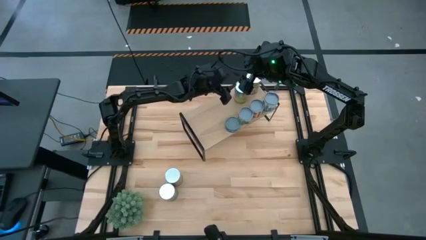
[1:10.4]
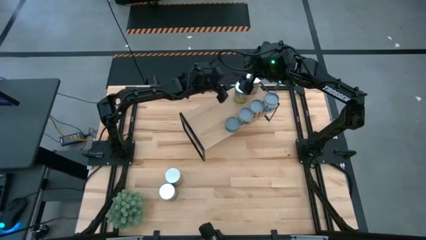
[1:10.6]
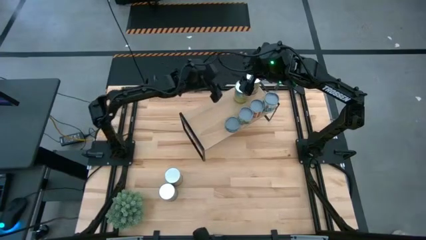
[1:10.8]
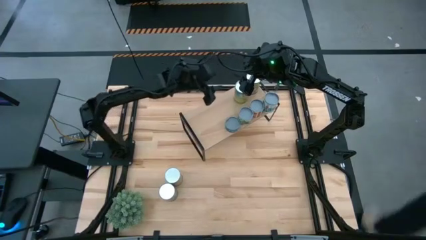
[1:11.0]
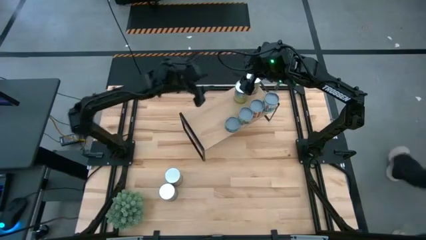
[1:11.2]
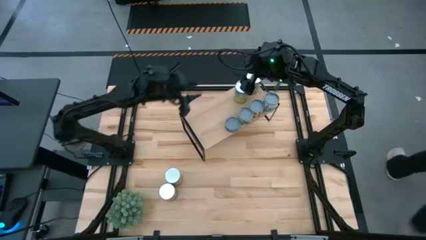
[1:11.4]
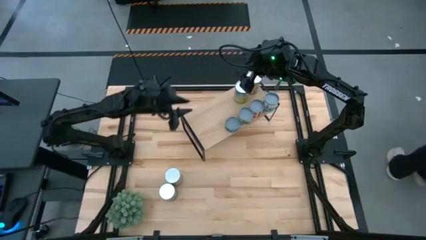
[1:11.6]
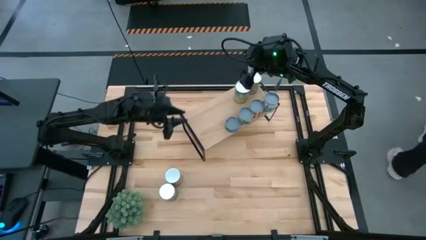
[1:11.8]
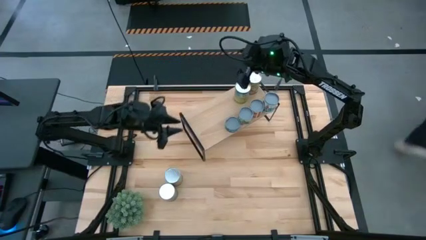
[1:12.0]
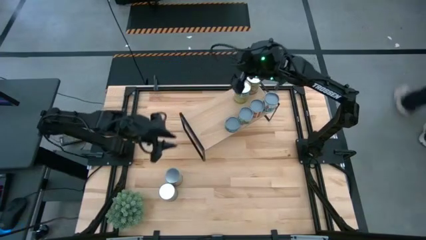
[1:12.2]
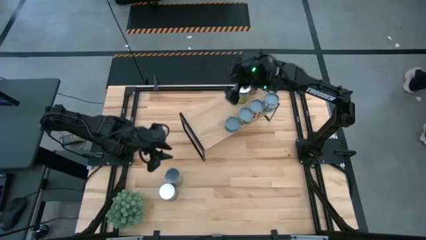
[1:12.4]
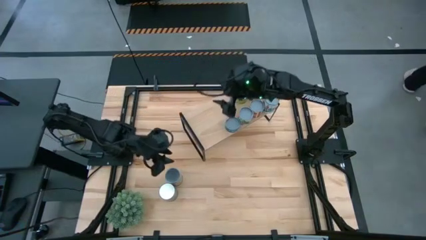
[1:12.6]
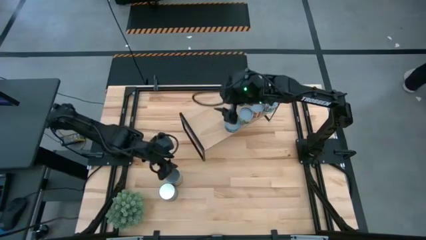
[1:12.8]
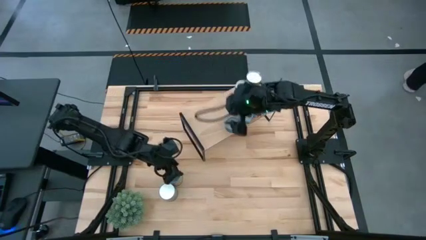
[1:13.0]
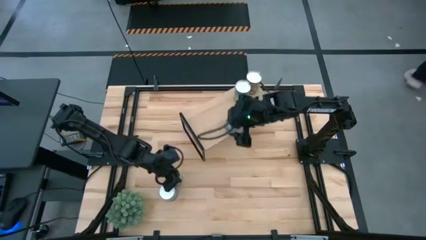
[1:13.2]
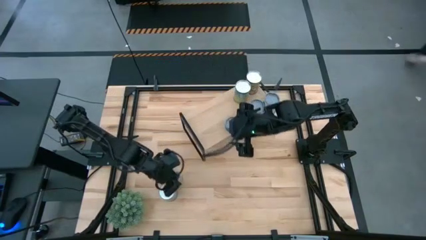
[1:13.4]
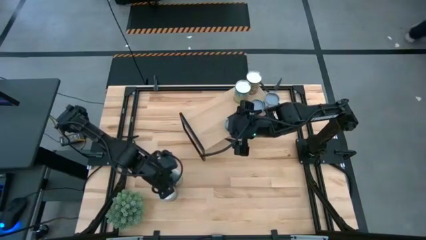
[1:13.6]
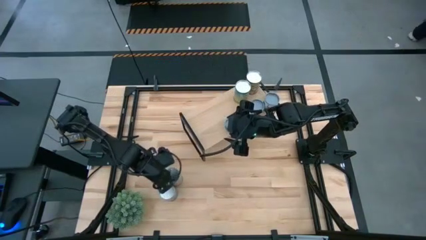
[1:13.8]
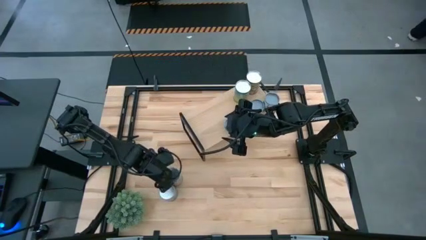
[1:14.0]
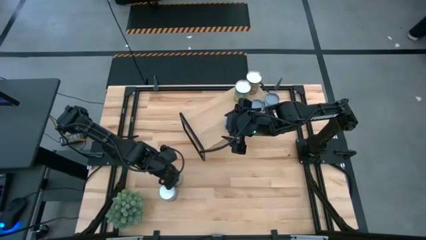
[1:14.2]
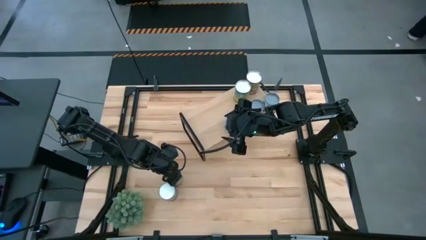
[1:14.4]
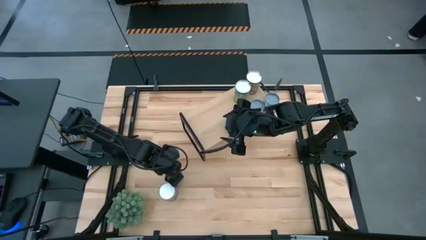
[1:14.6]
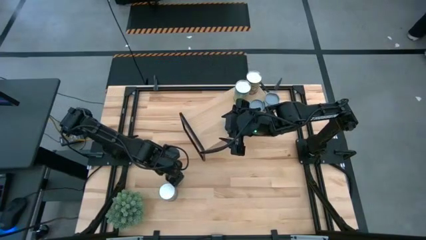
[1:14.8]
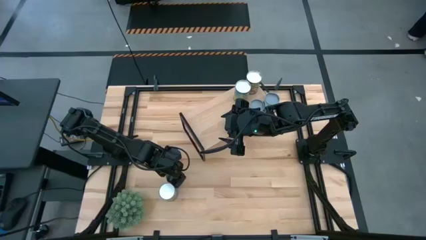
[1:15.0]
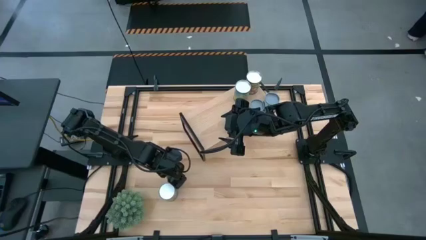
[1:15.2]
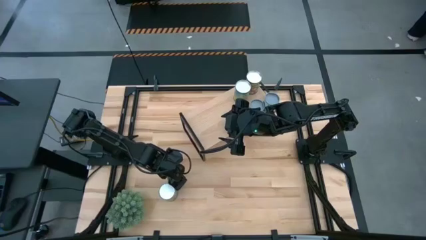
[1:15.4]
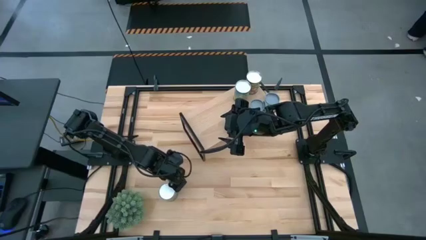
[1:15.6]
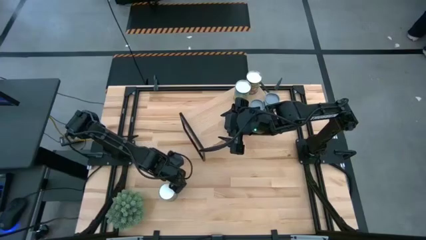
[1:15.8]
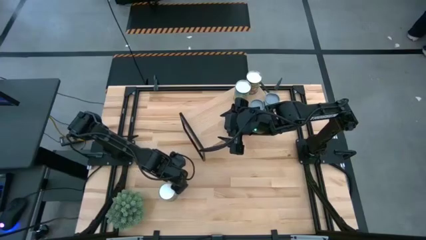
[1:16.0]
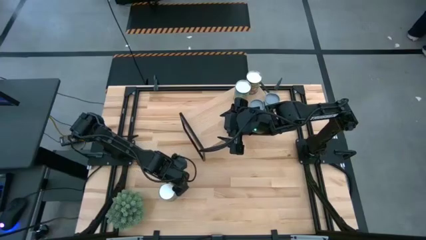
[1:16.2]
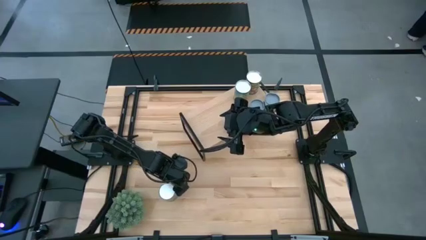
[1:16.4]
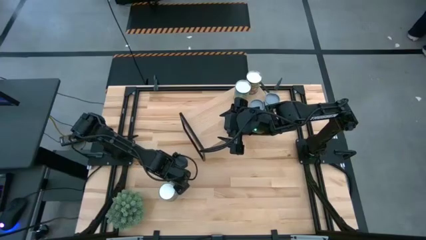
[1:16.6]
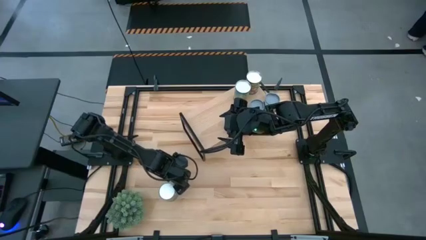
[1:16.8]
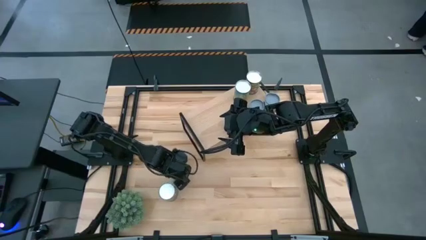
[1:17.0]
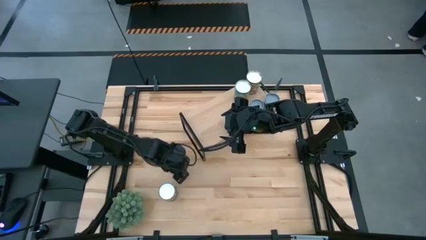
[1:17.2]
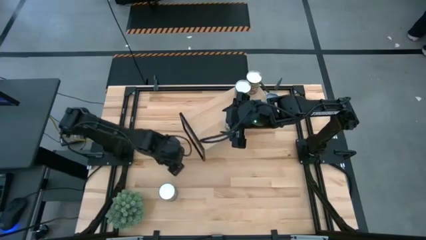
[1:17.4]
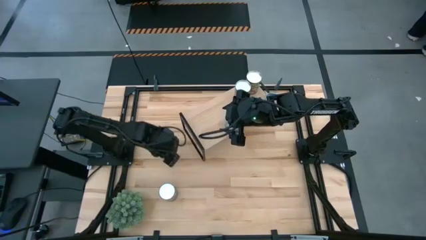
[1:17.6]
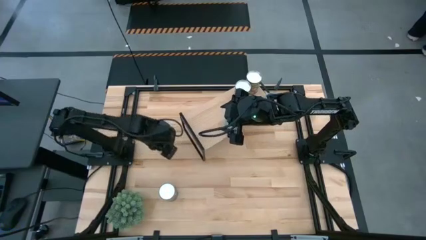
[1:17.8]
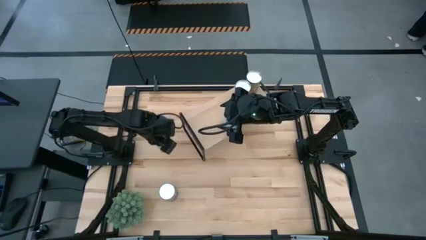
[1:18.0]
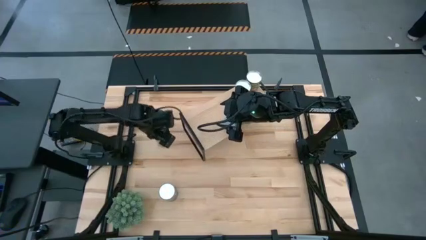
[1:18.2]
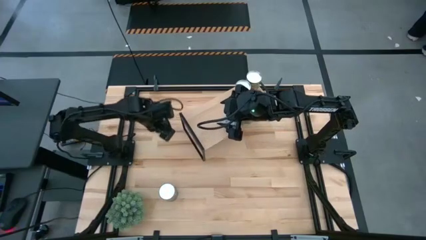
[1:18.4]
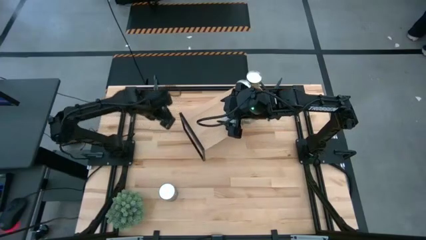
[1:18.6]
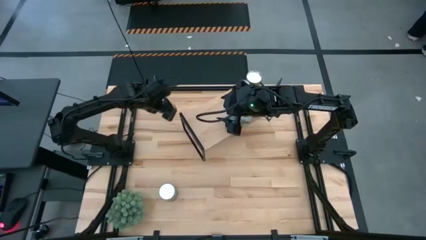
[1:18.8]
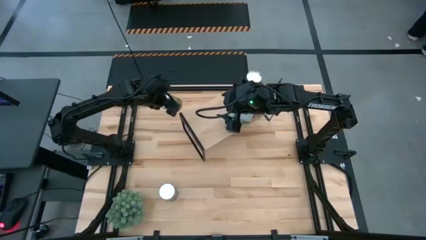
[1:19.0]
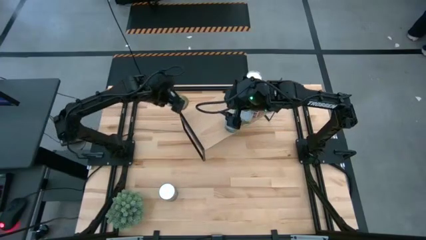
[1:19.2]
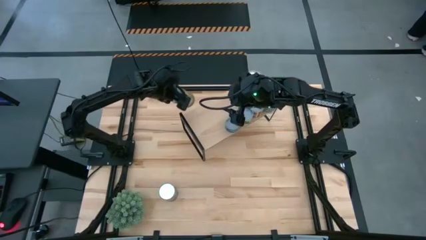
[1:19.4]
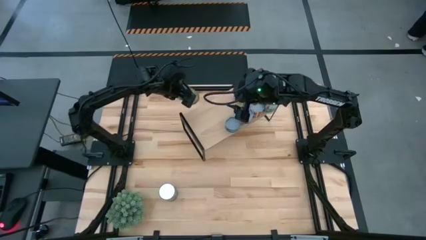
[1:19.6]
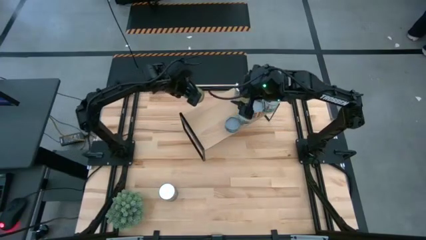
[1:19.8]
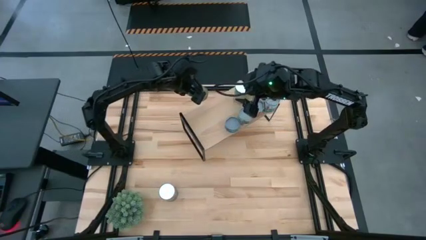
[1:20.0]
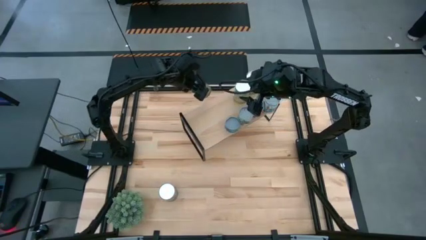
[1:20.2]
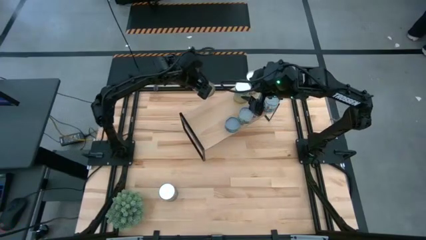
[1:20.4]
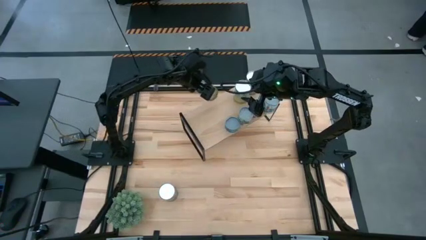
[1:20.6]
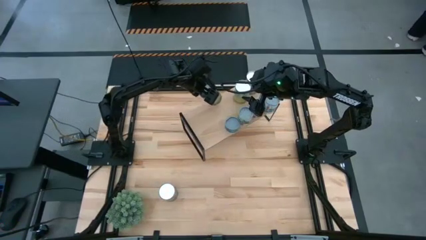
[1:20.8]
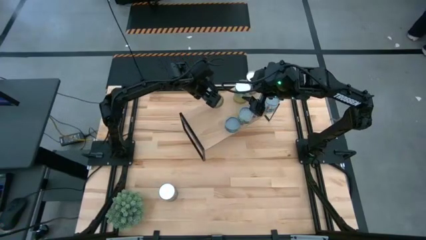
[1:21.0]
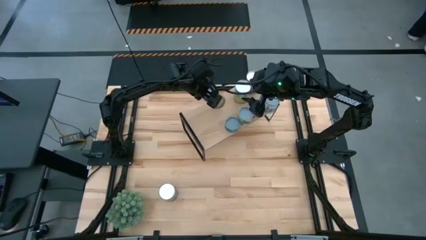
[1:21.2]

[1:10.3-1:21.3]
Task: Pick and place cans onto a shelf
Put the canned oranges on the shelf
